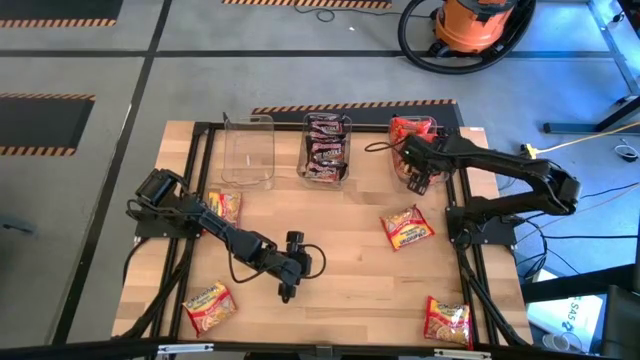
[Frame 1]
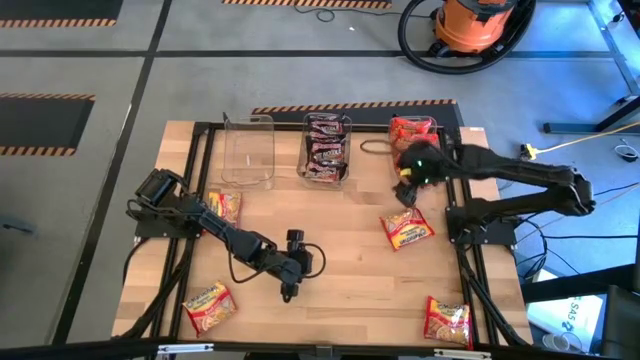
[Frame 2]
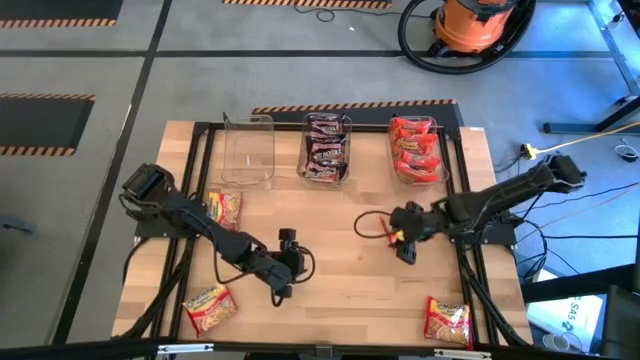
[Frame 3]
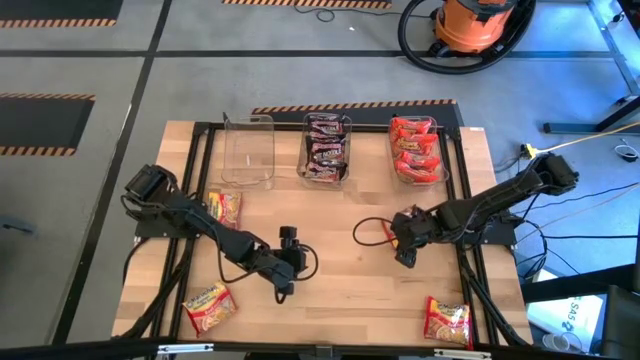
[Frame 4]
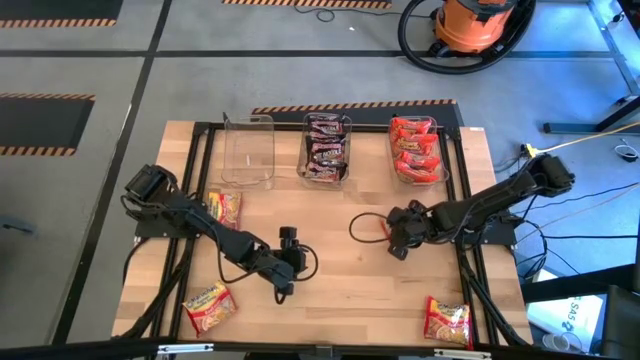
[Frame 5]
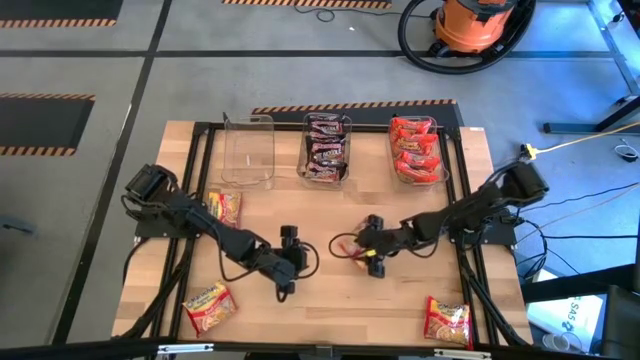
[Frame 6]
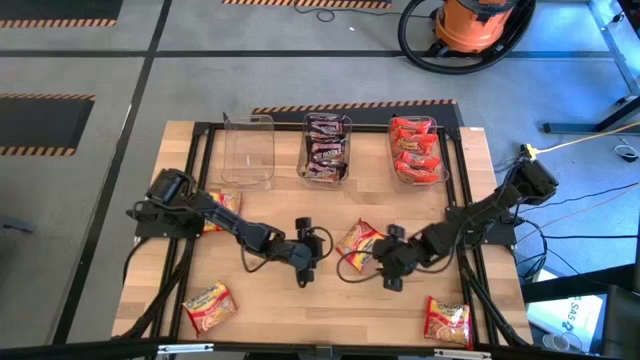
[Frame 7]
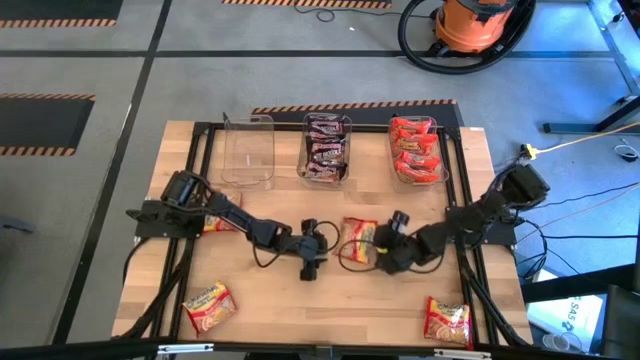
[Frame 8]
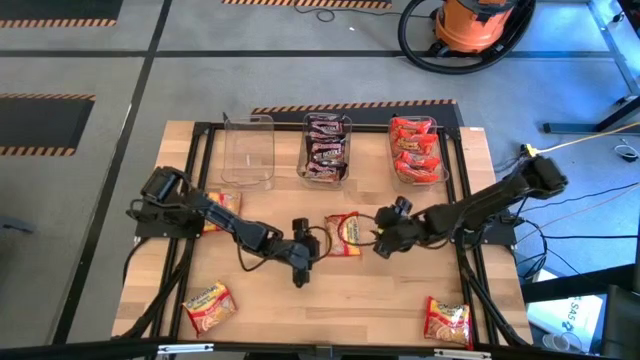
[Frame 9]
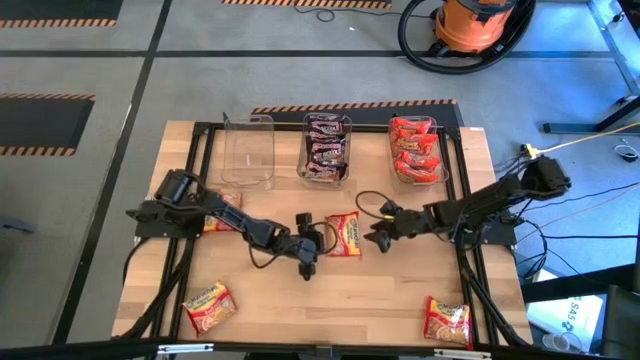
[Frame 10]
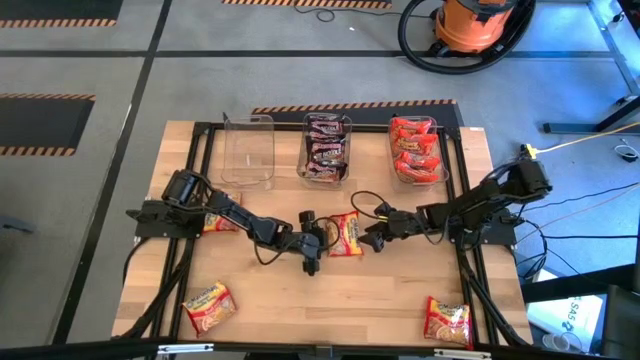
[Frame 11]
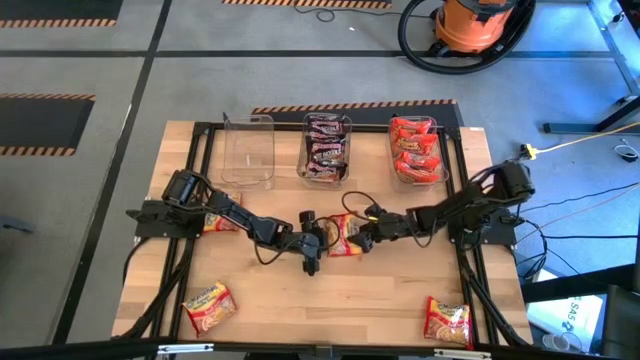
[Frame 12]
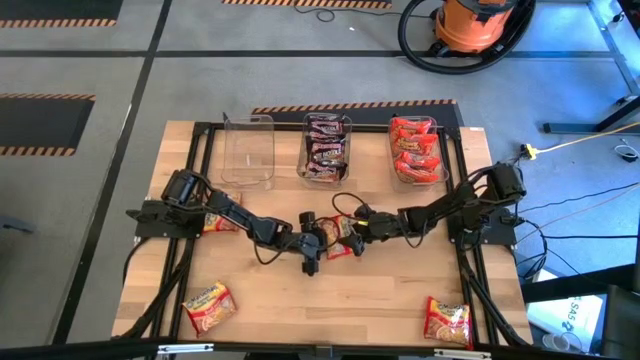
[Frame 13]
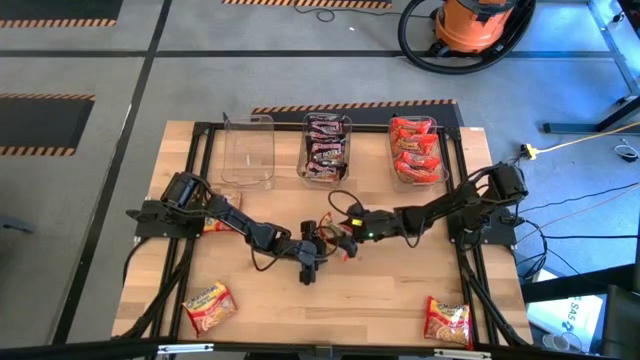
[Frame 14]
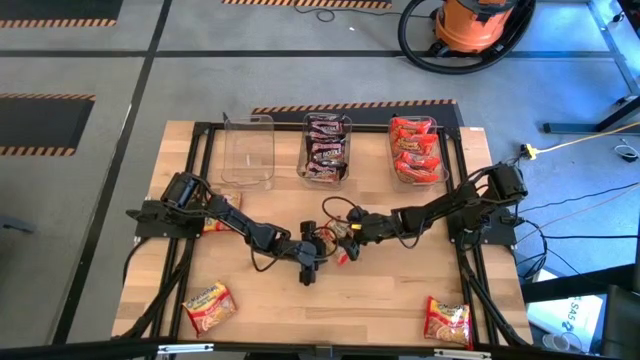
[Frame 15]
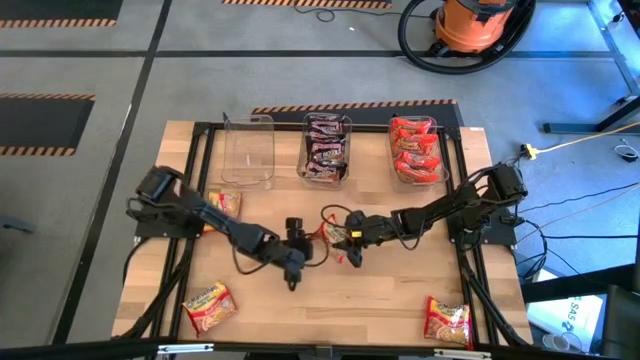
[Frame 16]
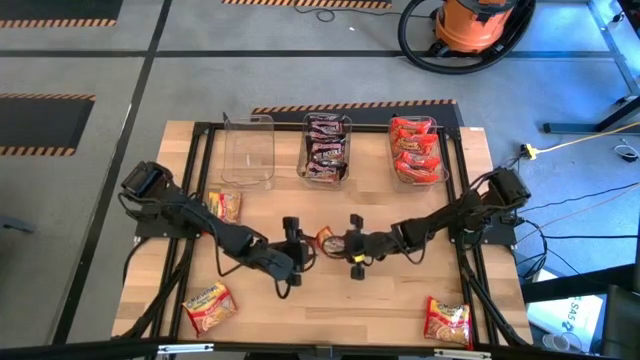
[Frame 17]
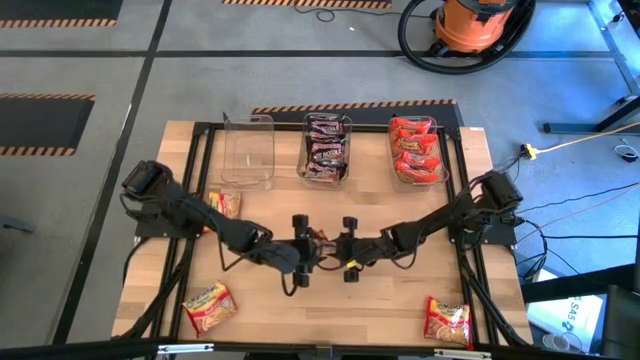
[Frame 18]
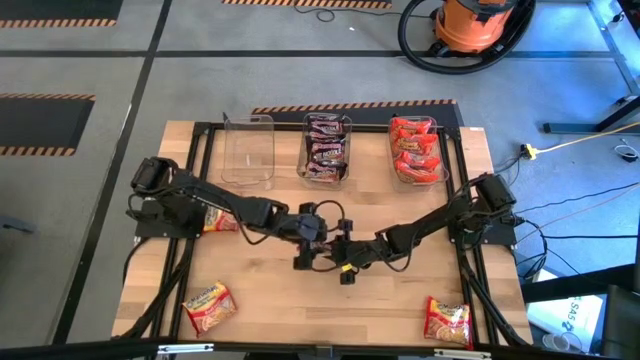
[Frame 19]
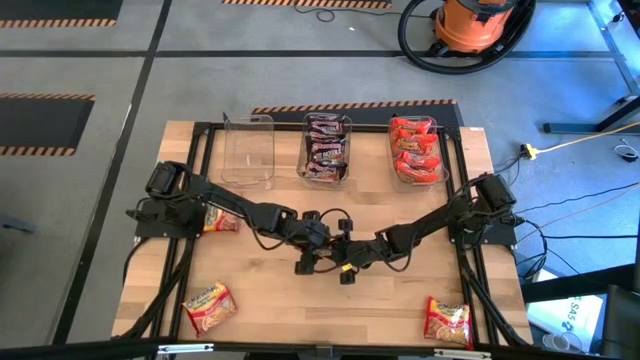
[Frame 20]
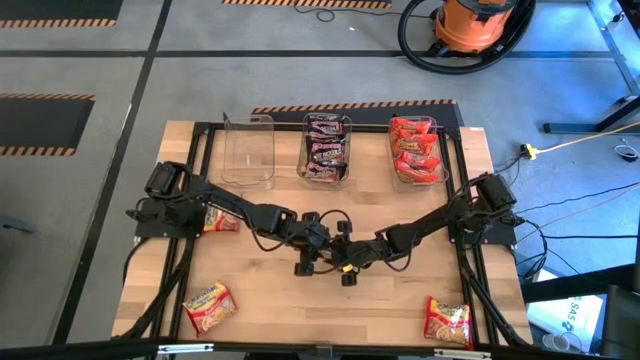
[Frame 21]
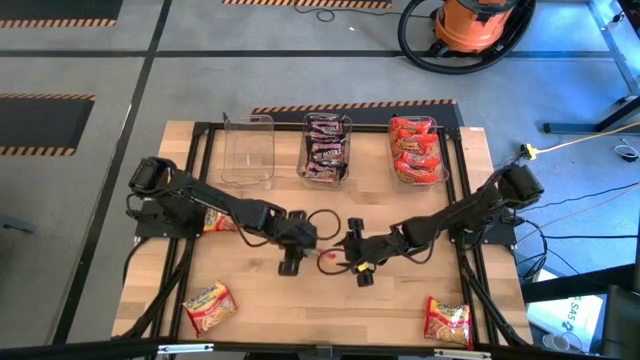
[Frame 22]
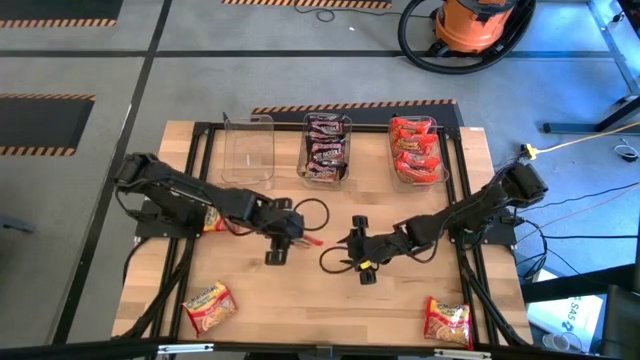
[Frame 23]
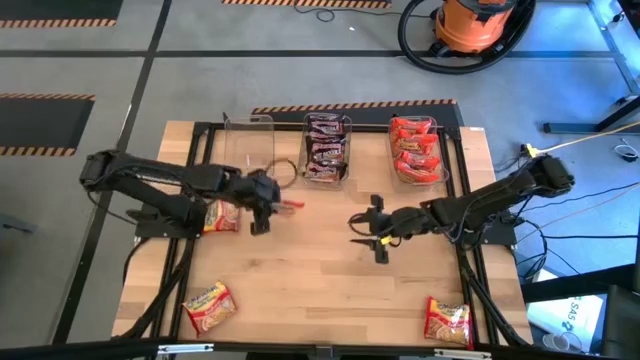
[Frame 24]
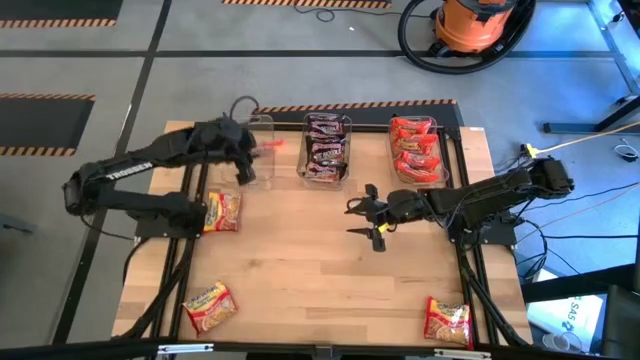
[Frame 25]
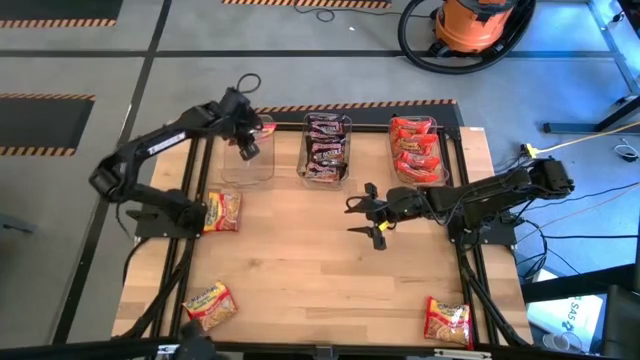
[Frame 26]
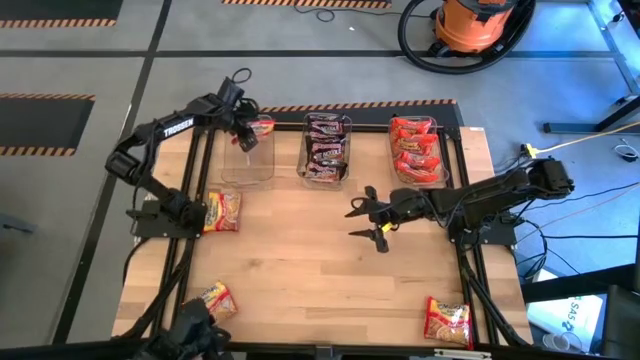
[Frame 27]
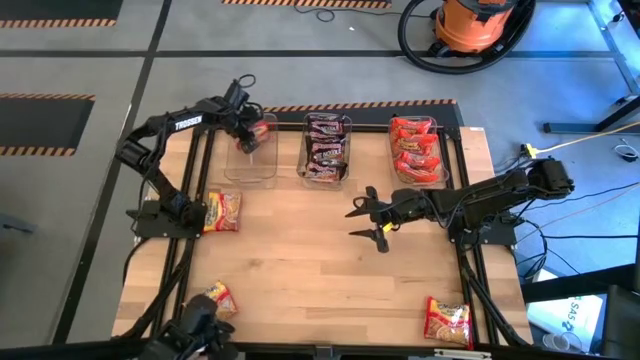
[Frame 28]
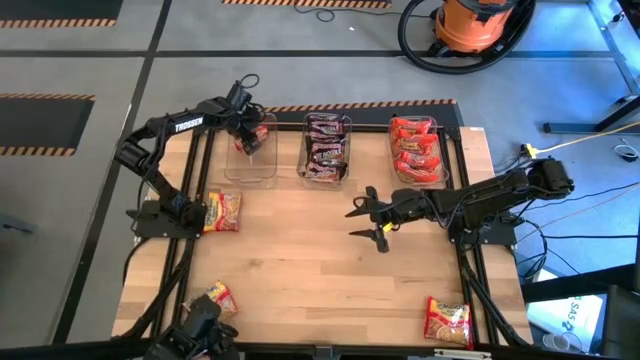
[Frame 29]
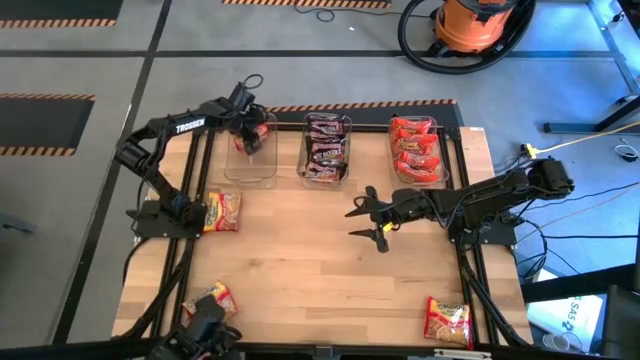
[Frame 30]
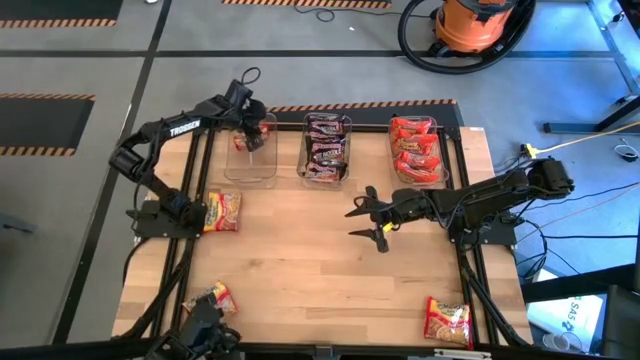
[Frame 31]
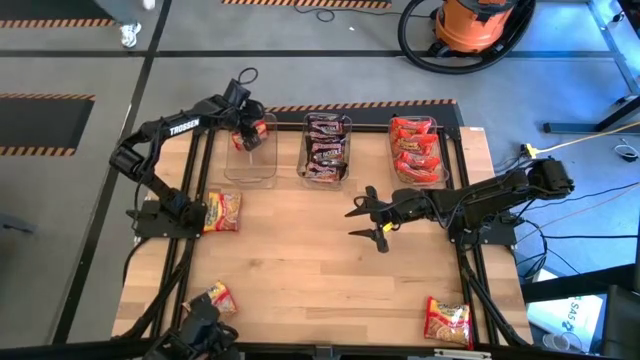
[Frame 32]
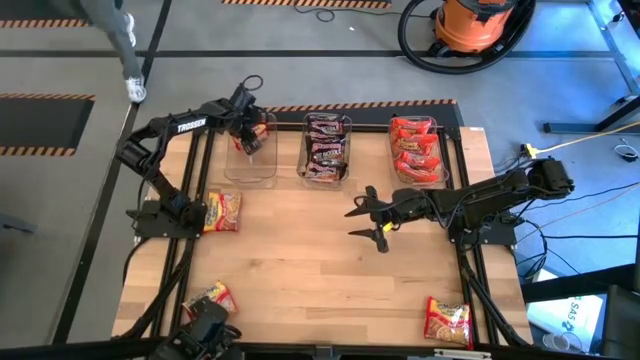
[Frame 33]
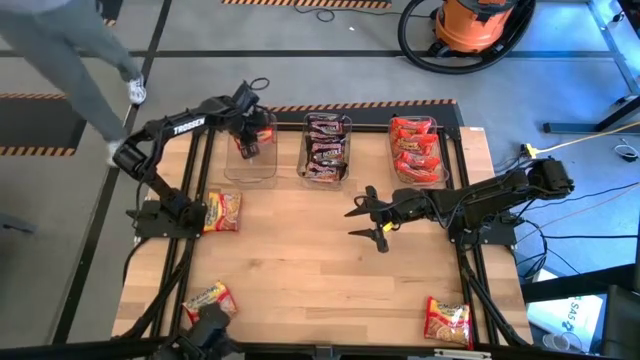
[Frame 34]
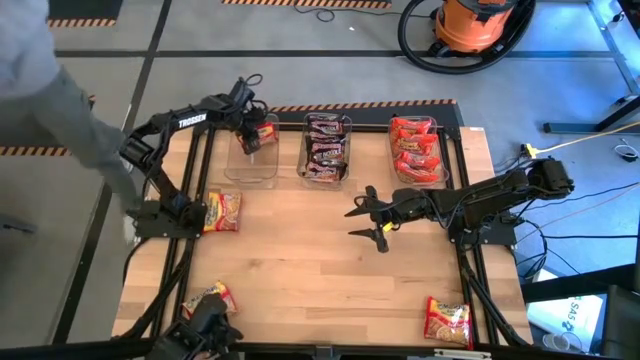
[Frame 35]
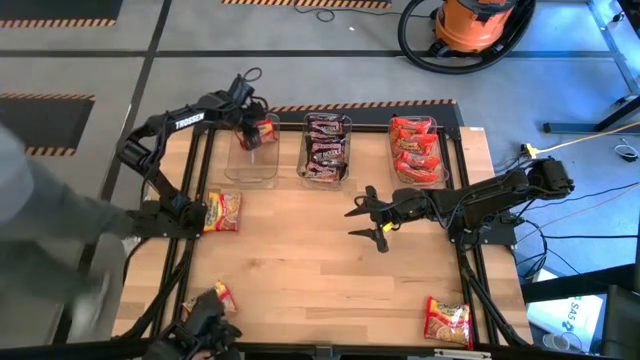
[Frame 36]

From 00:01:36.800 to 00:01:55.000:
Task: Sort Maruchan noodles
Put the red noodle pack into the left transparent bin

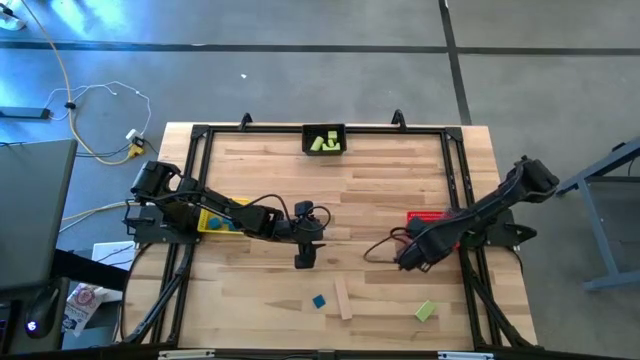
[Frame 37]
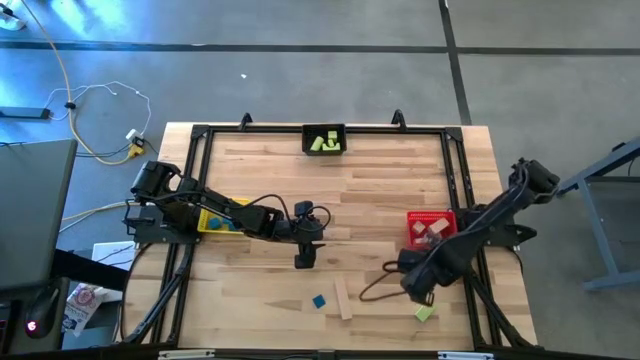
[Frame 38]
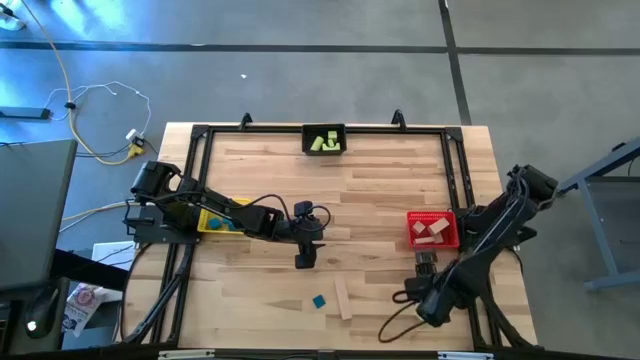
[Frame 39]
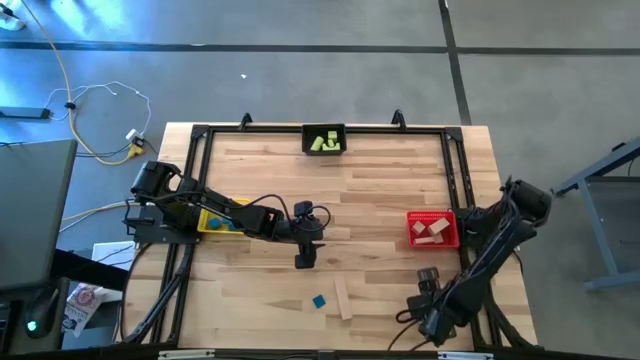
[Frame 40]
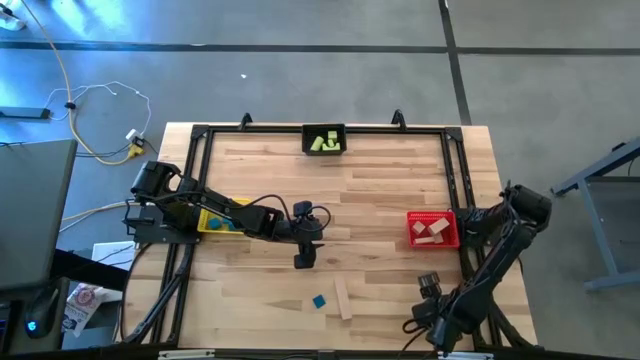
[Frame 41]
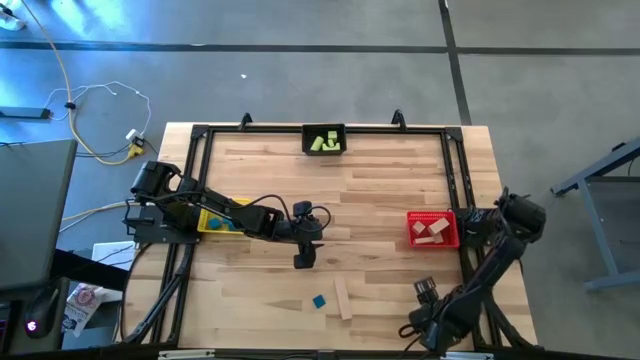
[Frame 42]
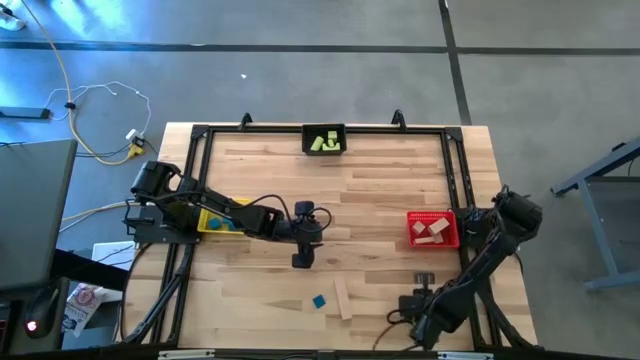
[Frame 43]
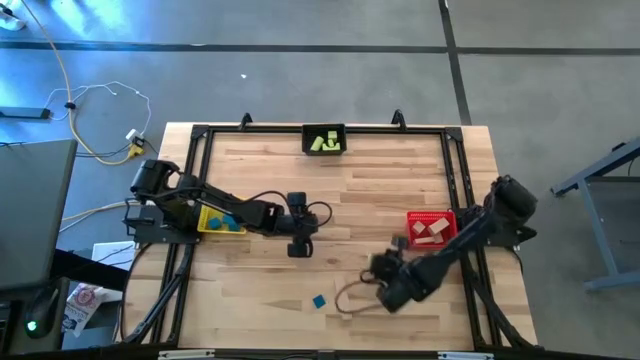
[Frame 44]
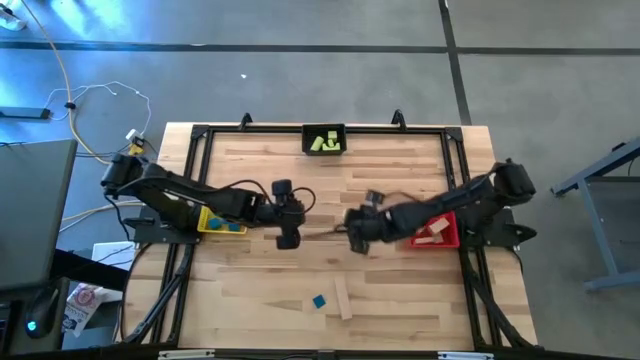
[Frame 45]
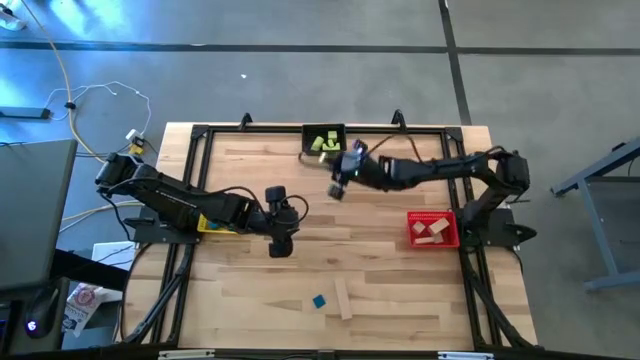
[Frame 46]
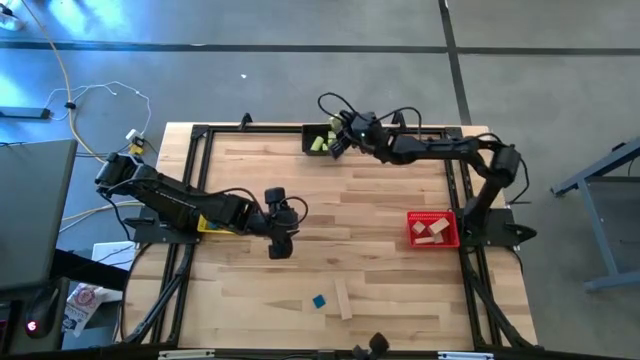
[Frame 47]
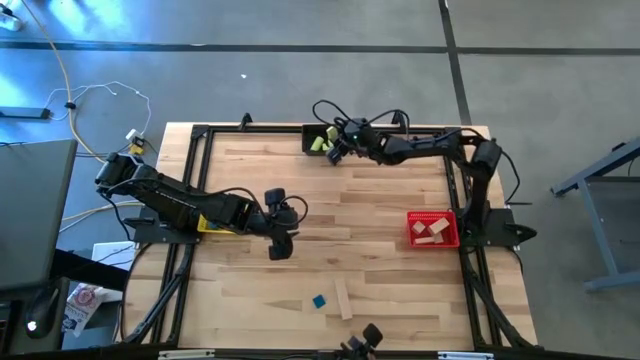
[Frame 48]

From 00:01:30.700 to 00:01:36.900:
Task: Sort & place blocks by color
Put the light green block into the black bin
